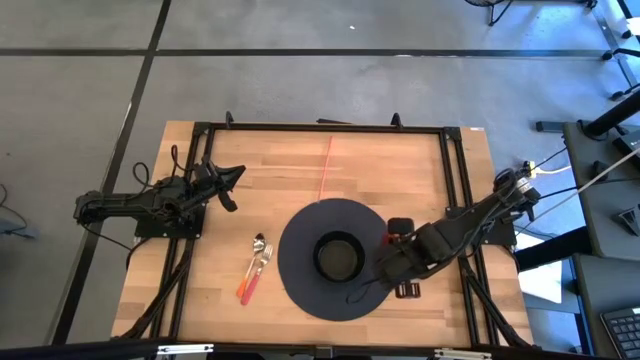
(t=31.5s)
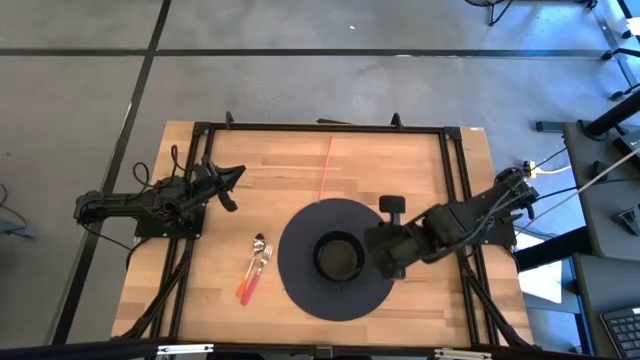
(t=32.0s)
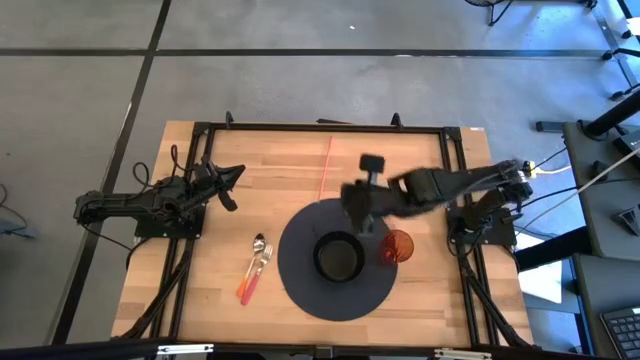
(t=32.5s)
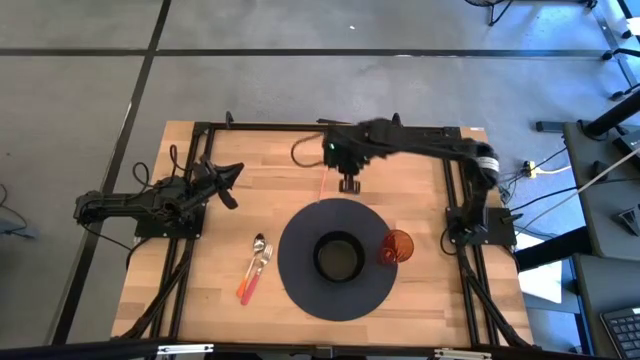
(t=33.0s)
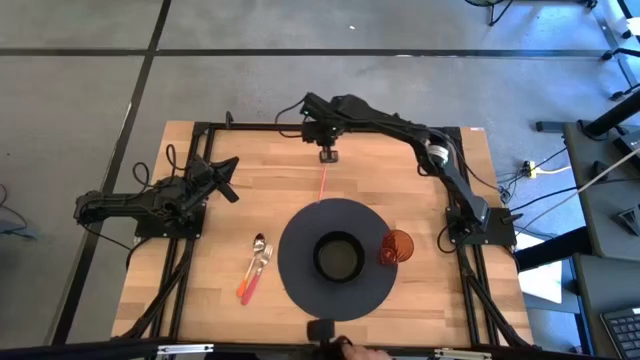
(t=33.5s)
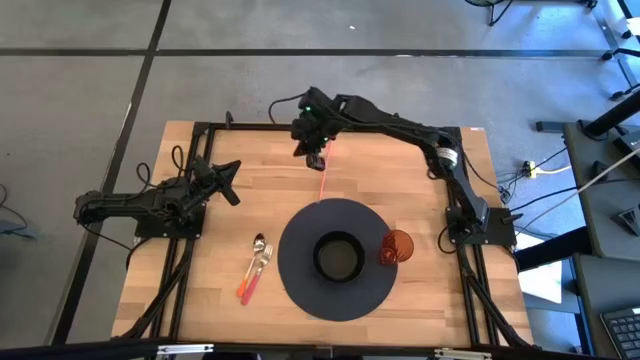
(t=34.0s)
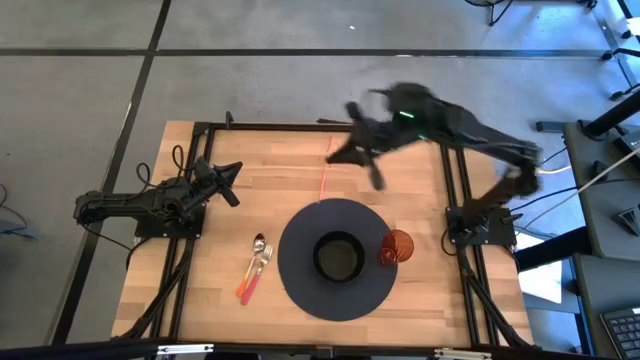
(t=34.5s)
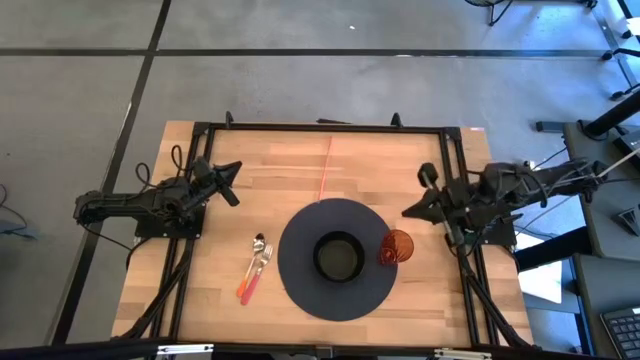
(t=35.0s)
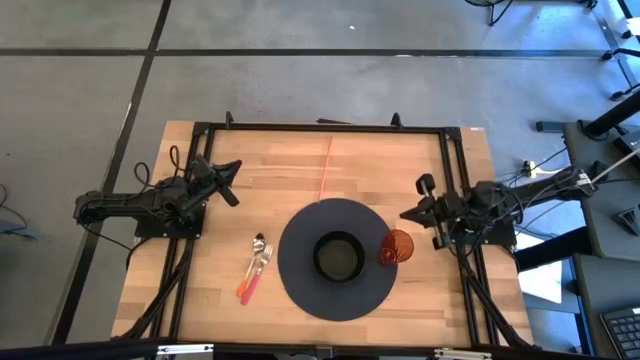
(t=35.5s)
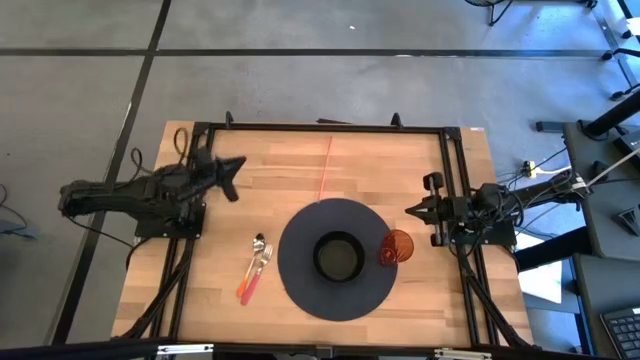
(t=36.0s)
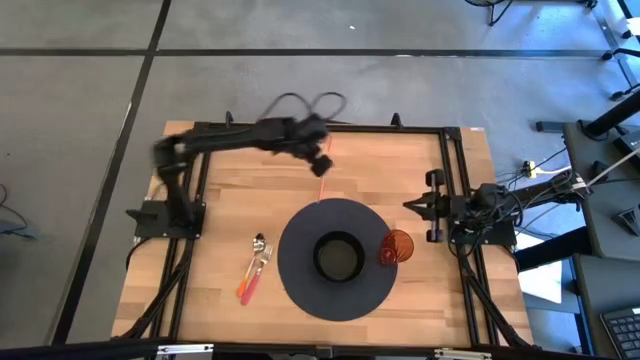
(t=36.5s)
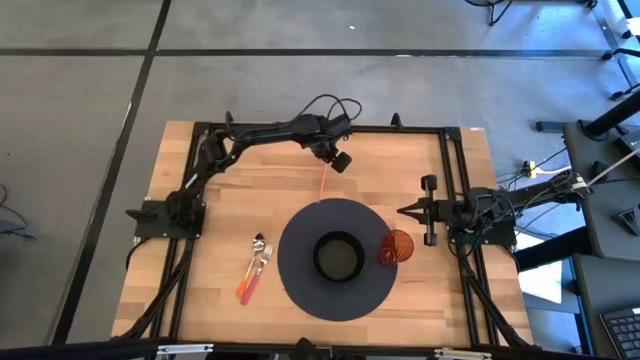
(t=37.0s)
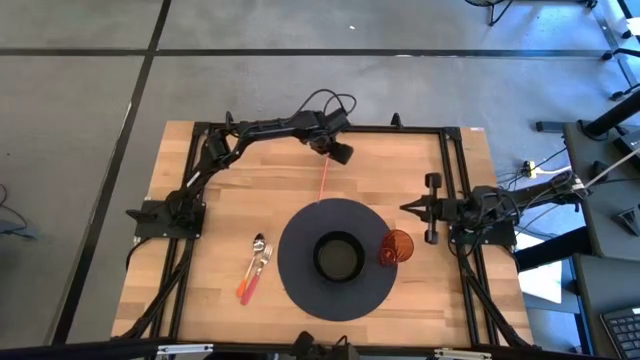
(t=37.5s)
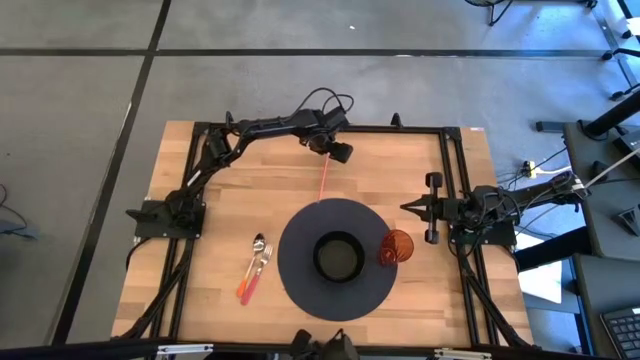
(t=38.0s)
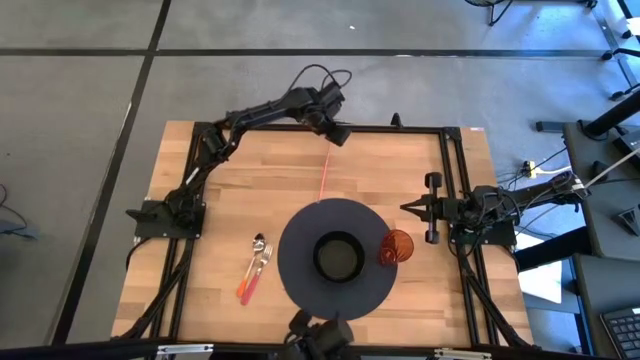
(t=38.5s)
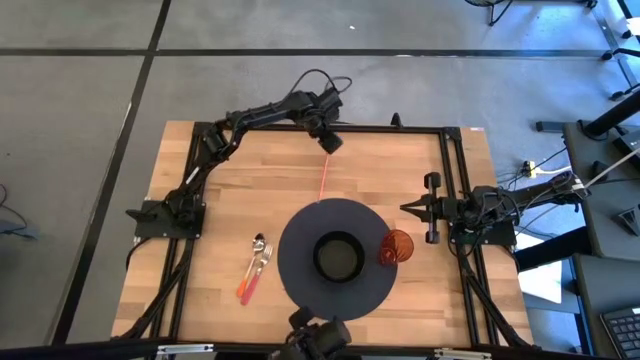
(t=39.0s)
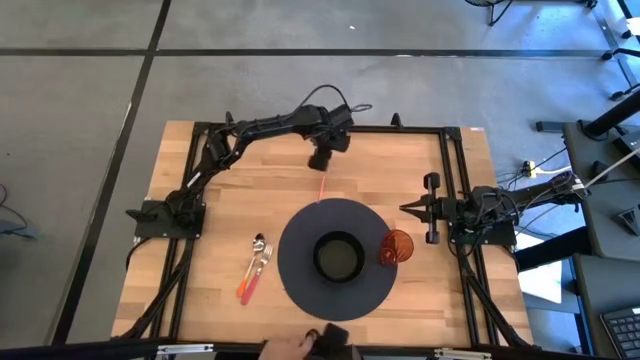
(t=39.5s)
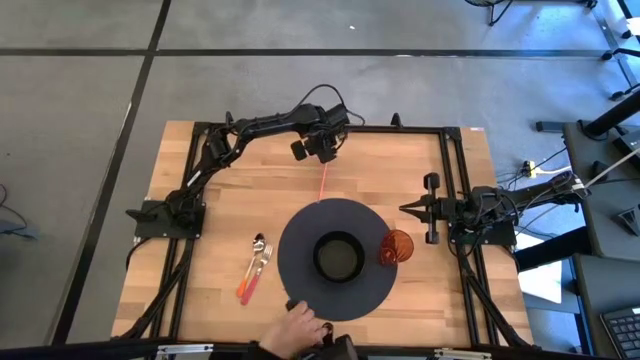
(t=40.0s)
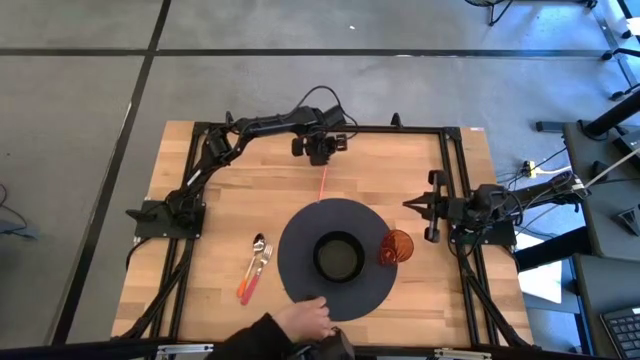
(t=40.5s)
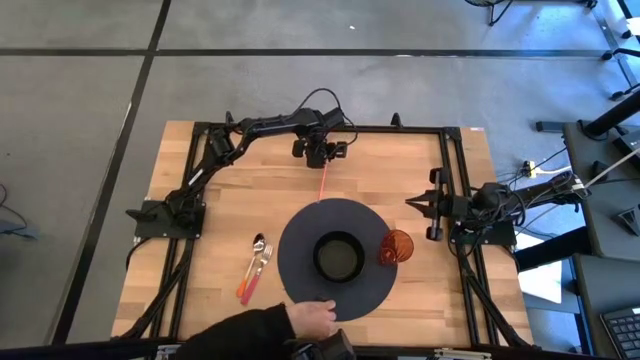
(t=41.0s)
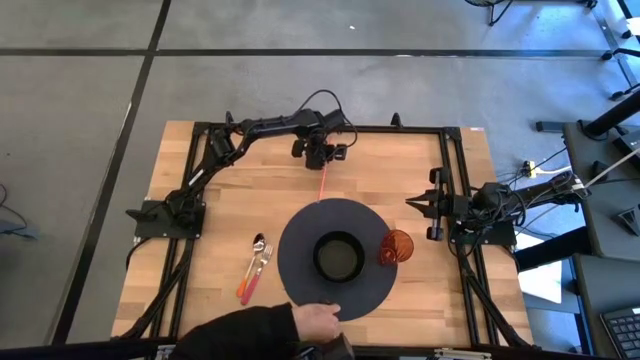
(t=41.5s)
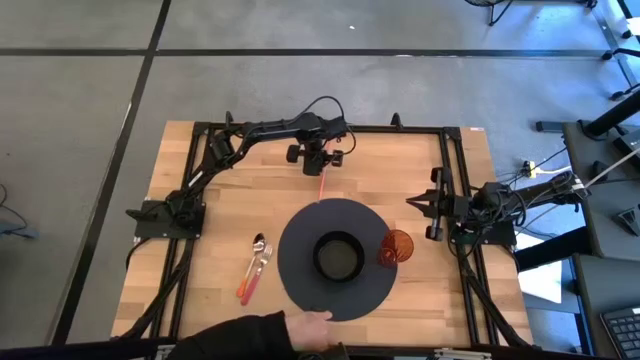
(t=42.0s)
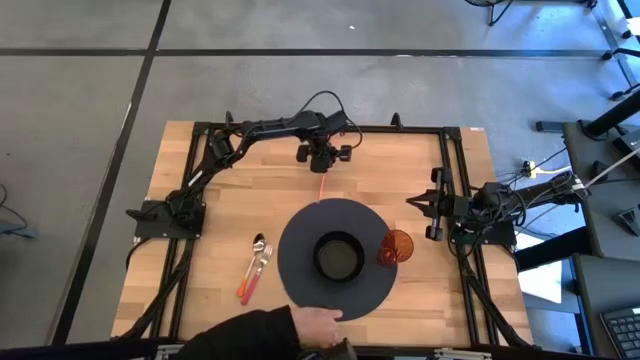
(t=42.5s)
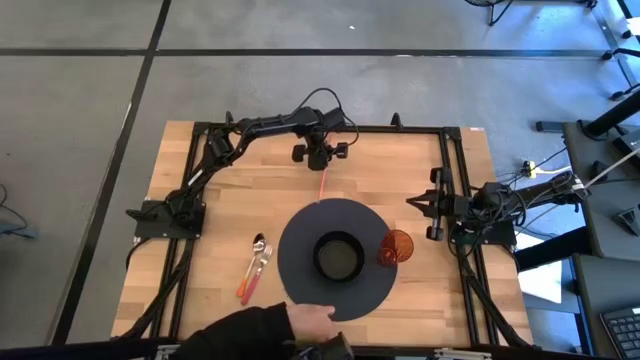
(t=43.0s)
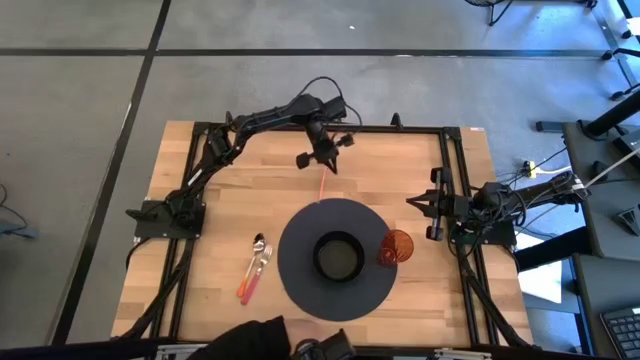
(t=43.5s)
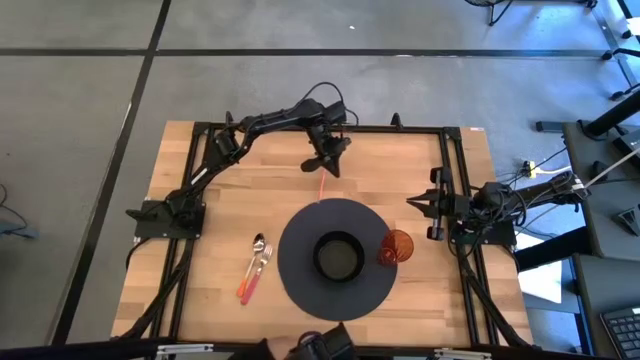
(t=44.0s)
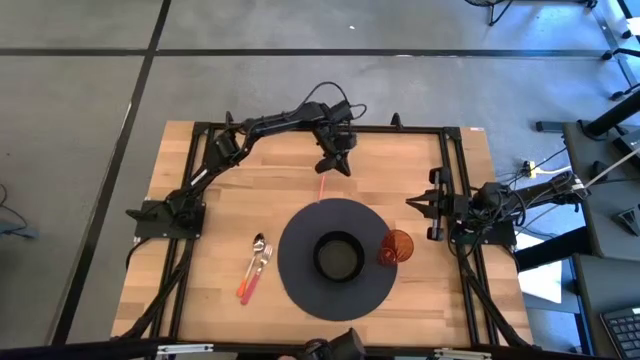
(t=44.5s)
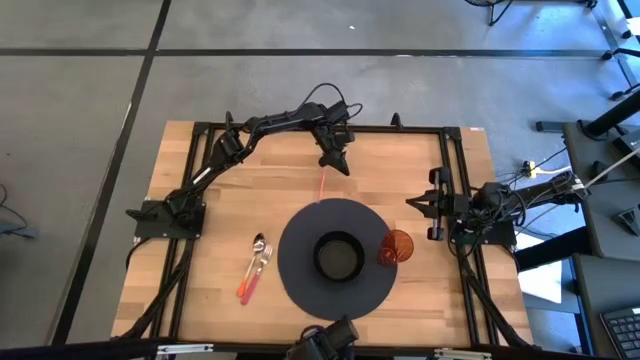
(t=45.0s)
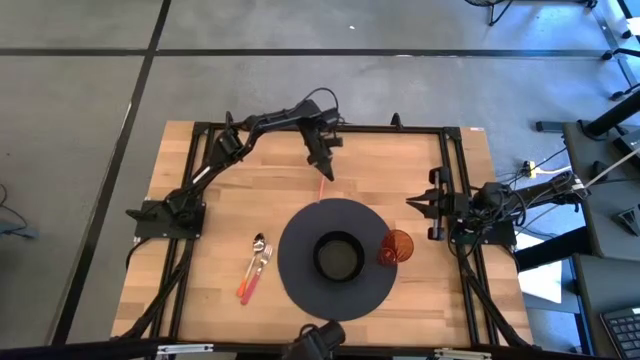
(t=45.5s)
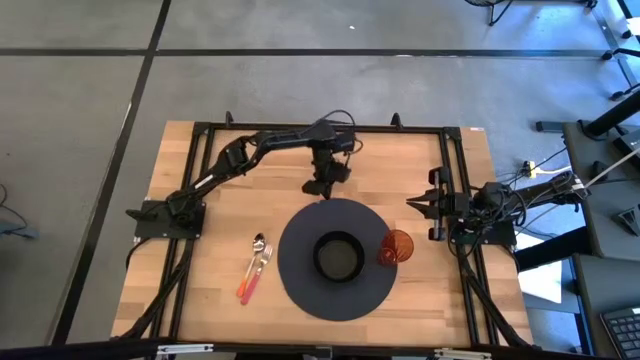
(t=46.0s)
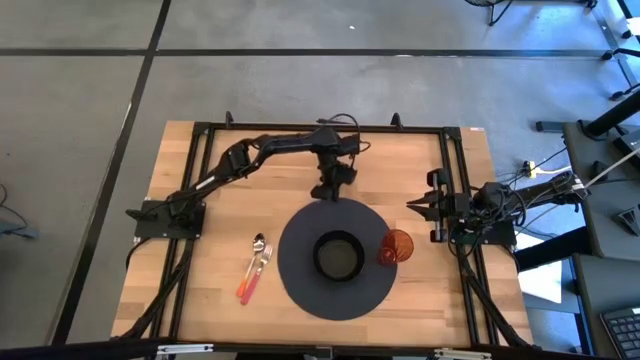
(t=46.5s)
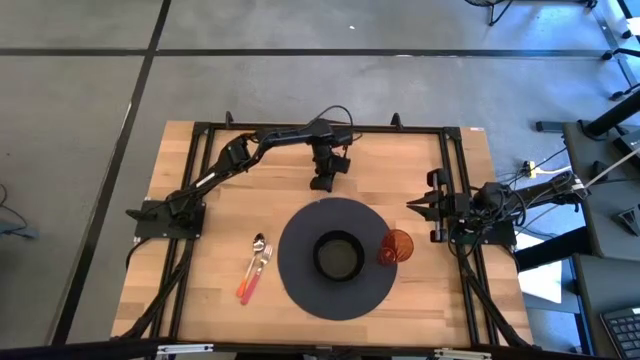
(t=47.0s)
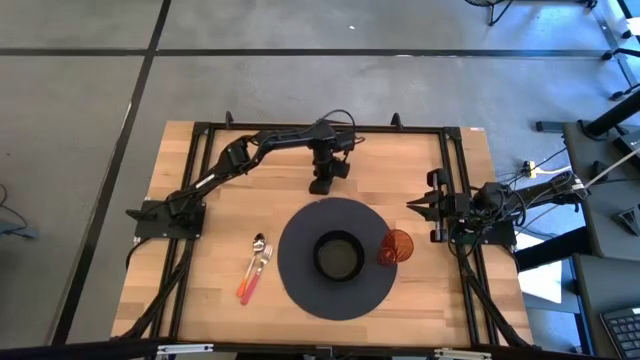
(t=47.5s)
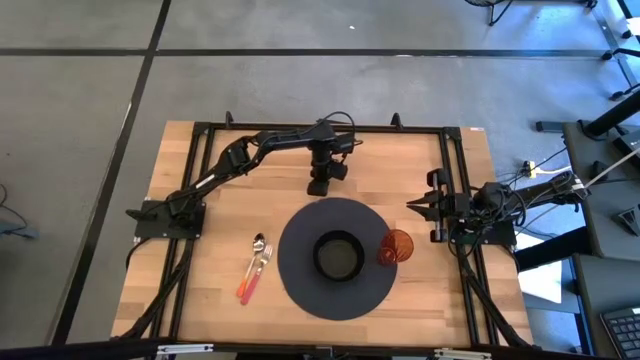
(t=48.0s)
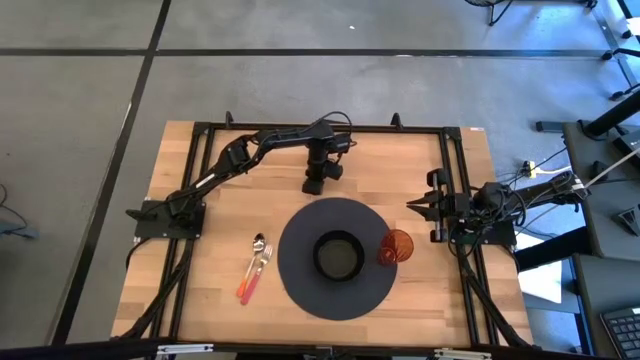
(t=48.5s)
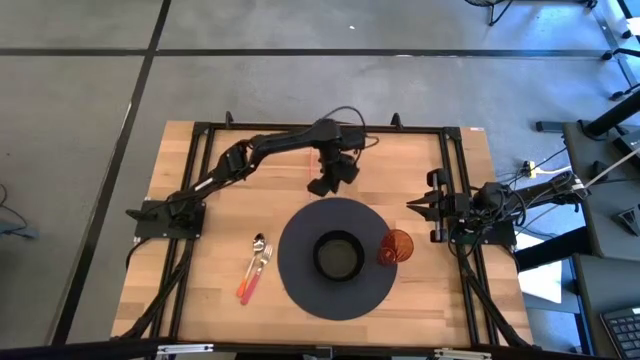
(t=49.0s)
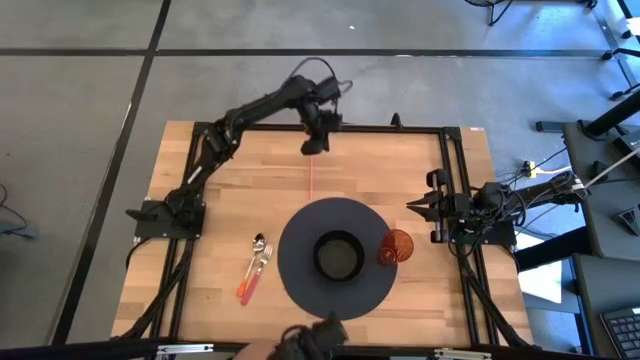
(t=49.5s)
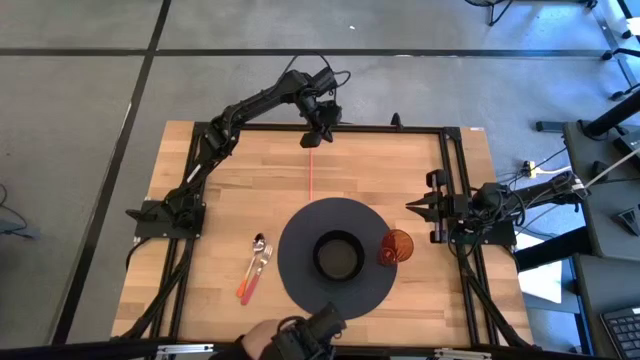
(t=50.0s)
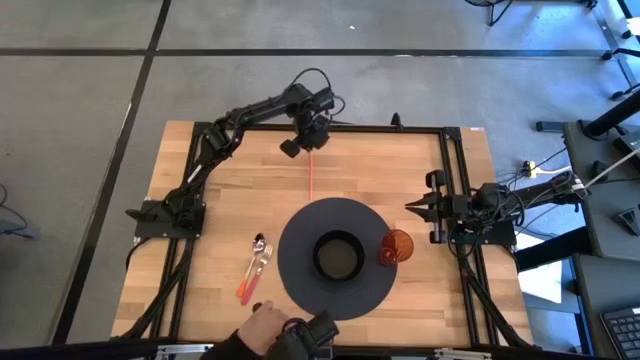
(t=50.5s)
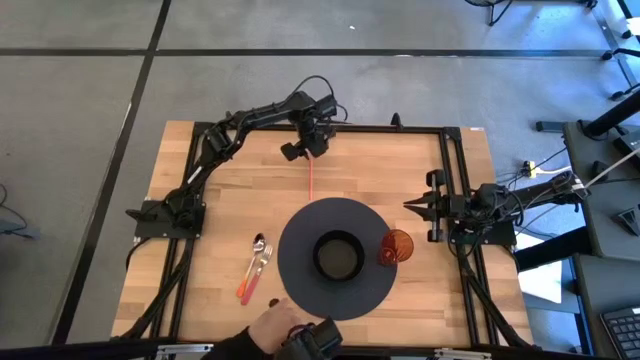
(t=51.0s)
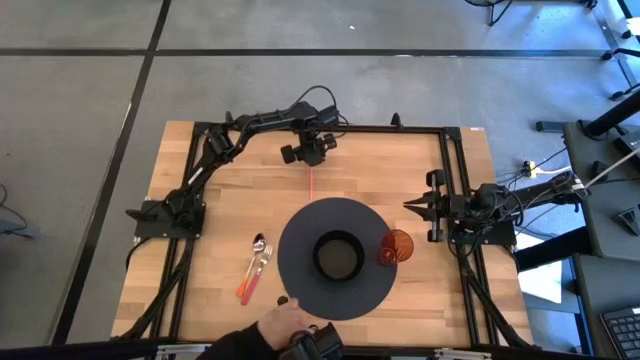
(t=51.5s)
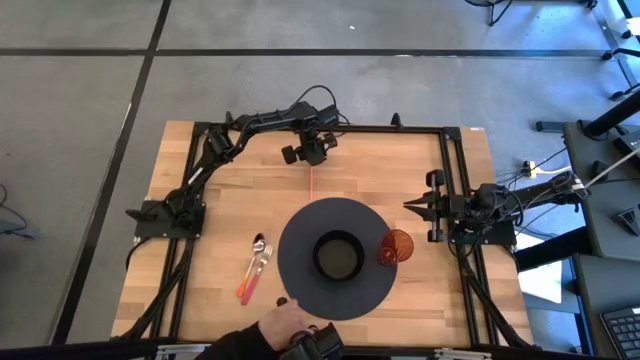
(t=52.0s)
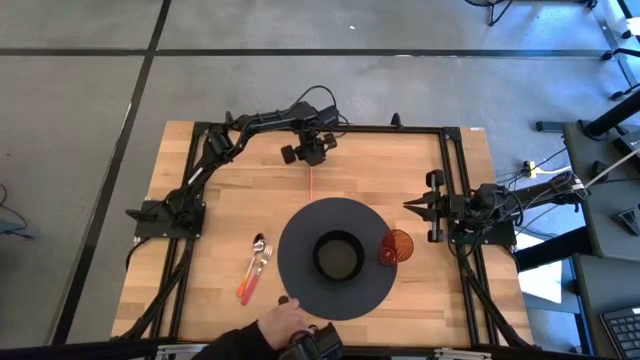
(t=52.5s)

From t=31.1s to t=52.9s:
Task: Pick & Place Utensil
Put the red straw into the orange cup on the mat
